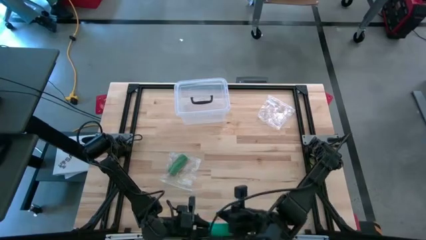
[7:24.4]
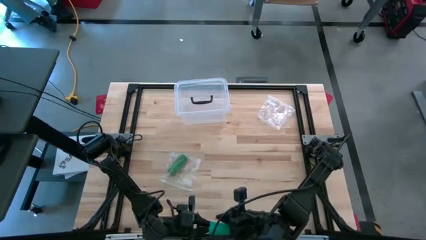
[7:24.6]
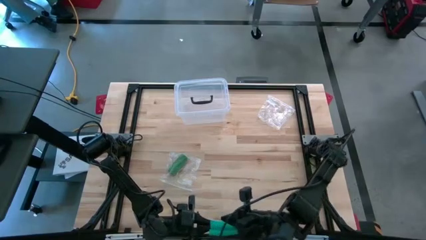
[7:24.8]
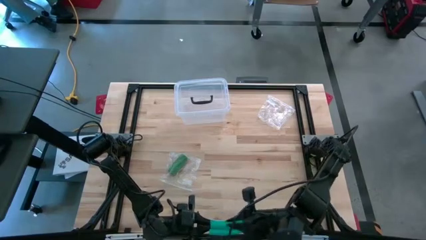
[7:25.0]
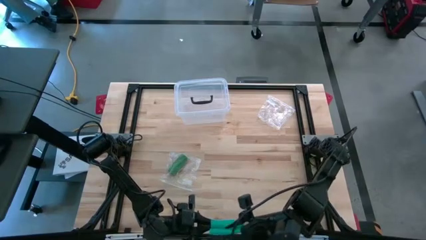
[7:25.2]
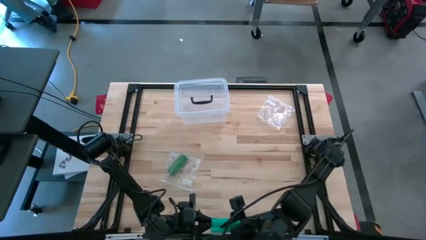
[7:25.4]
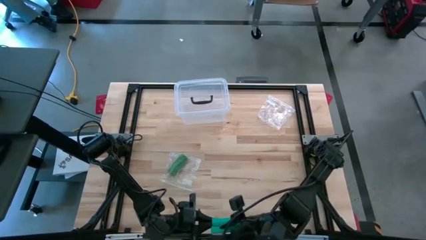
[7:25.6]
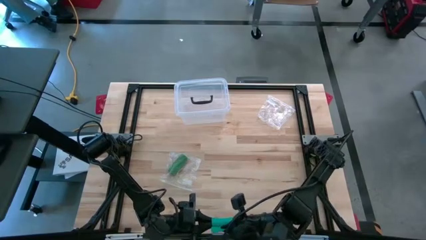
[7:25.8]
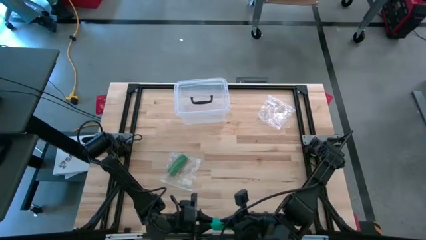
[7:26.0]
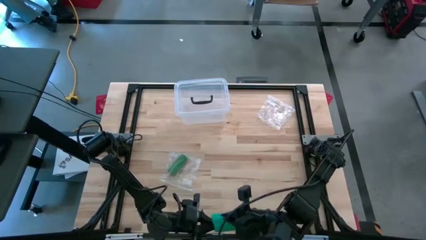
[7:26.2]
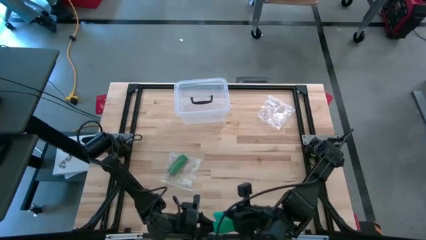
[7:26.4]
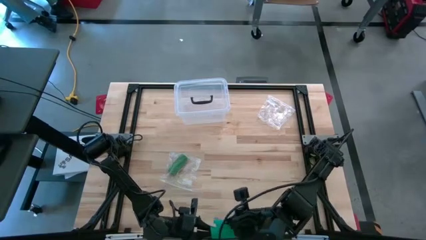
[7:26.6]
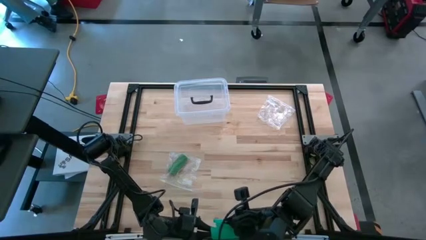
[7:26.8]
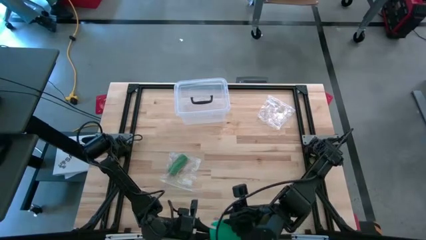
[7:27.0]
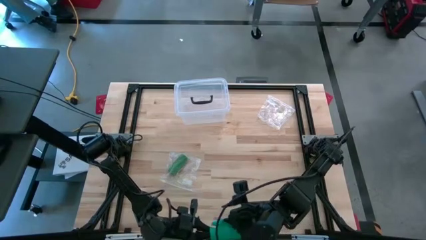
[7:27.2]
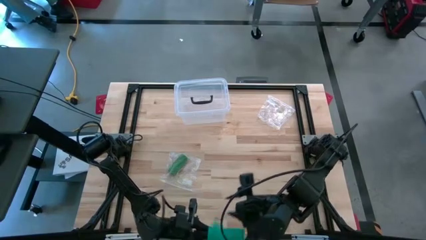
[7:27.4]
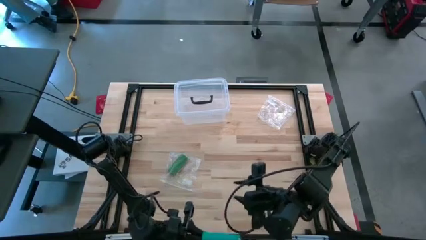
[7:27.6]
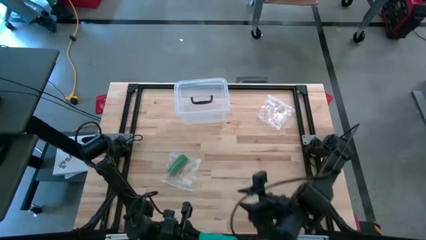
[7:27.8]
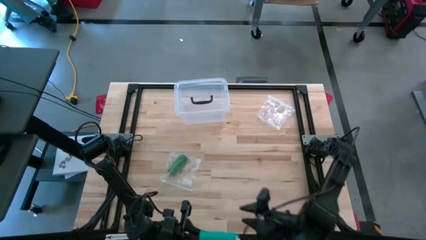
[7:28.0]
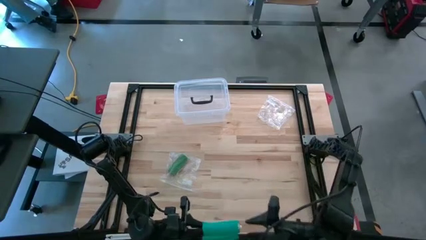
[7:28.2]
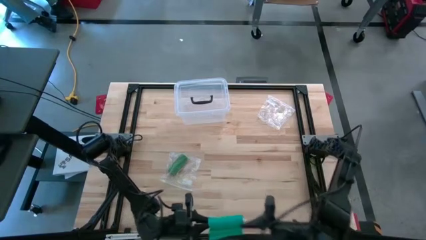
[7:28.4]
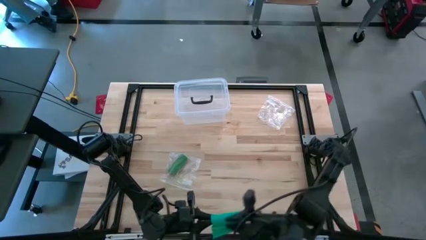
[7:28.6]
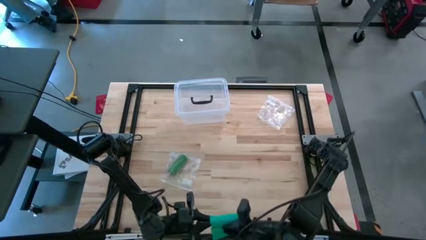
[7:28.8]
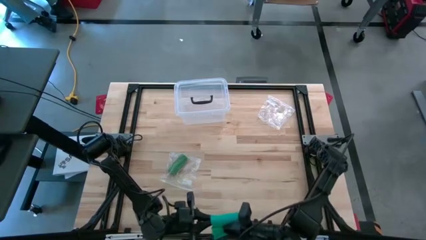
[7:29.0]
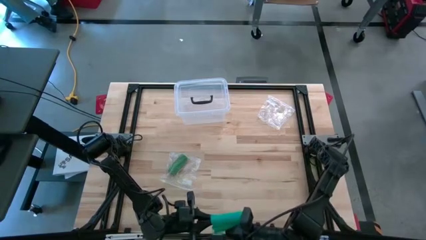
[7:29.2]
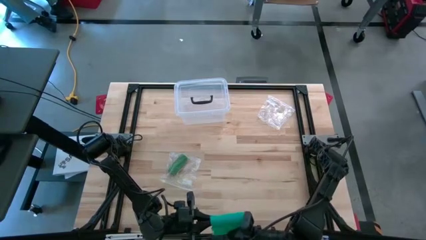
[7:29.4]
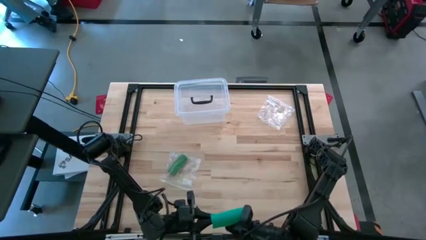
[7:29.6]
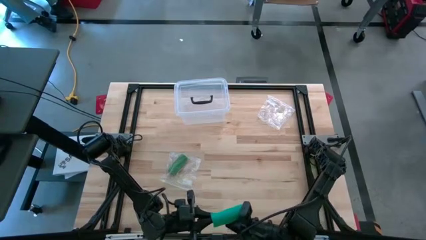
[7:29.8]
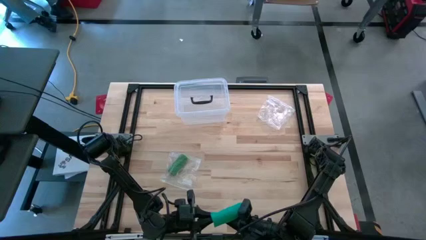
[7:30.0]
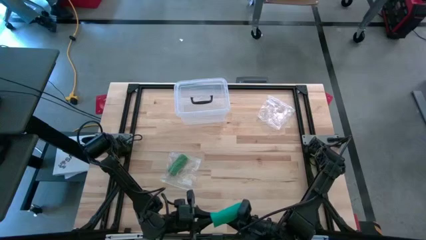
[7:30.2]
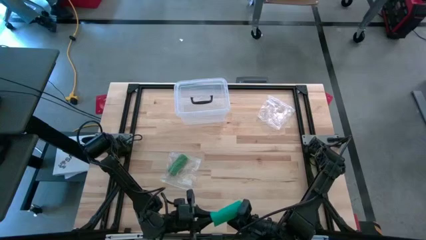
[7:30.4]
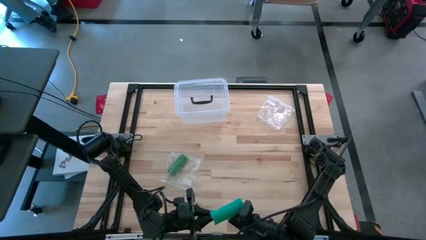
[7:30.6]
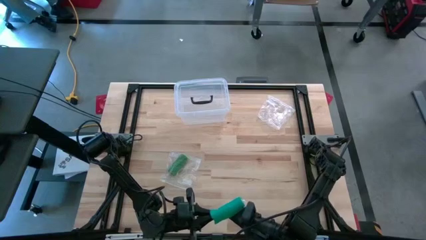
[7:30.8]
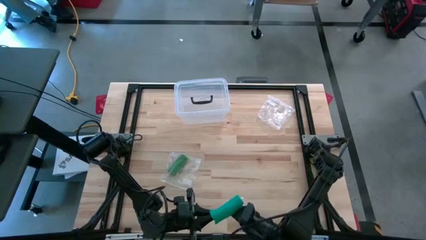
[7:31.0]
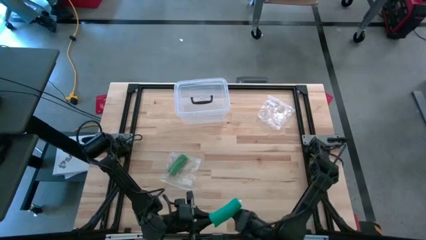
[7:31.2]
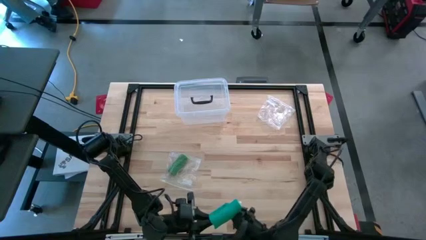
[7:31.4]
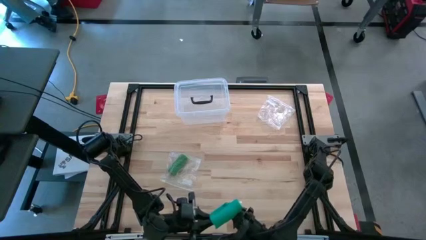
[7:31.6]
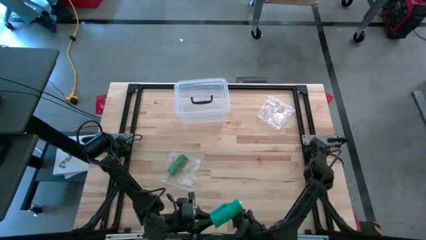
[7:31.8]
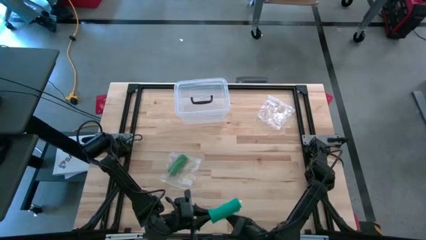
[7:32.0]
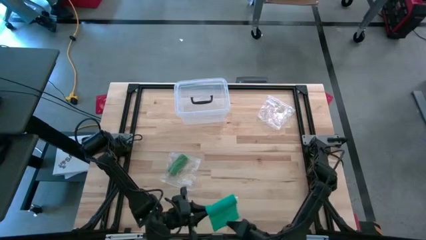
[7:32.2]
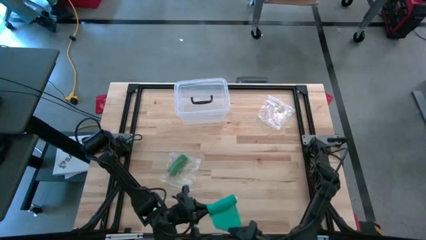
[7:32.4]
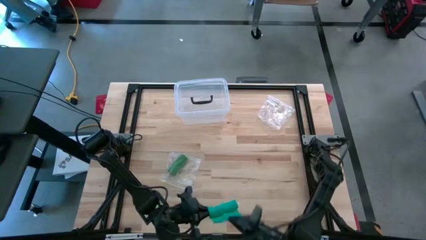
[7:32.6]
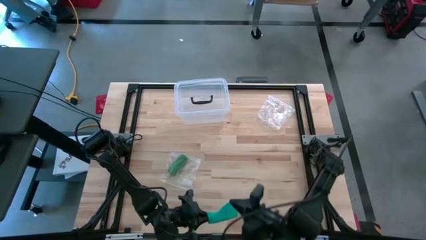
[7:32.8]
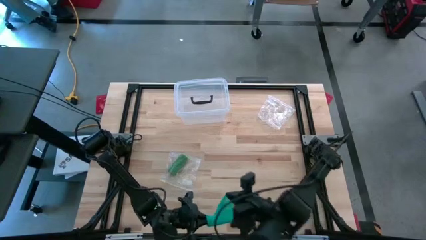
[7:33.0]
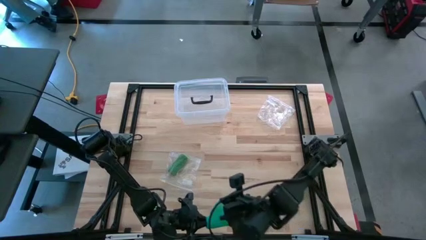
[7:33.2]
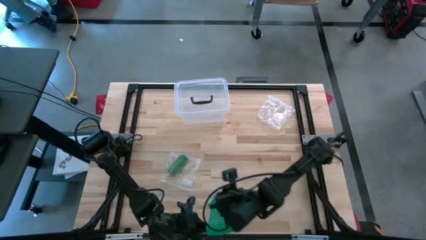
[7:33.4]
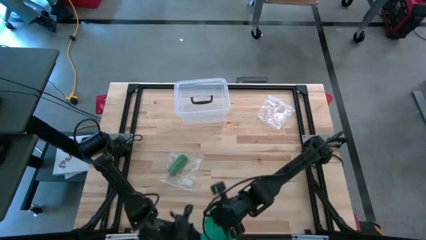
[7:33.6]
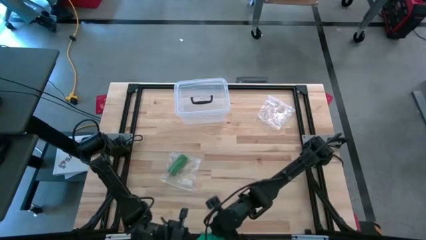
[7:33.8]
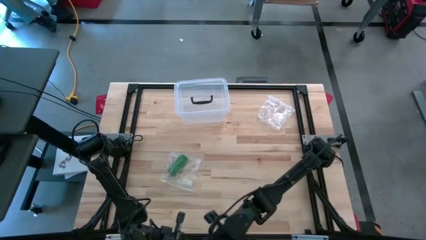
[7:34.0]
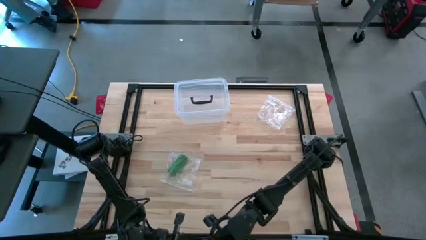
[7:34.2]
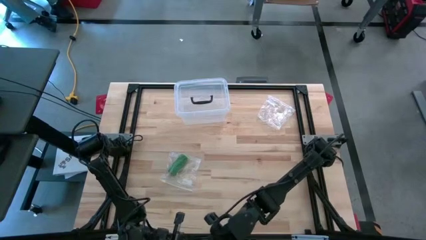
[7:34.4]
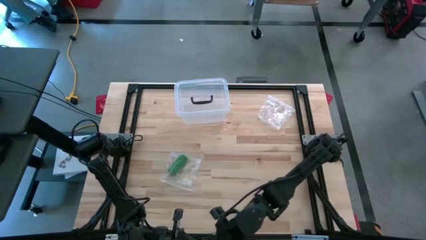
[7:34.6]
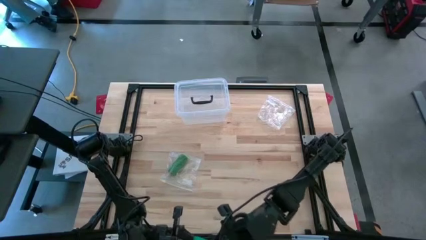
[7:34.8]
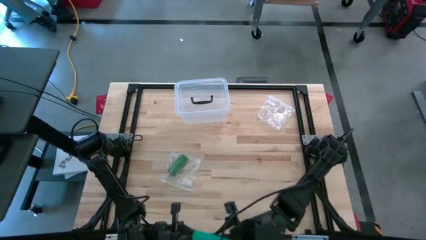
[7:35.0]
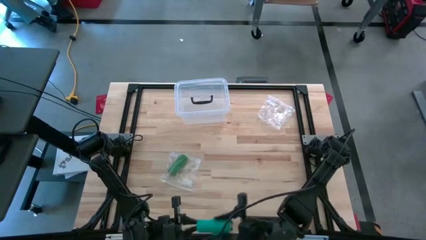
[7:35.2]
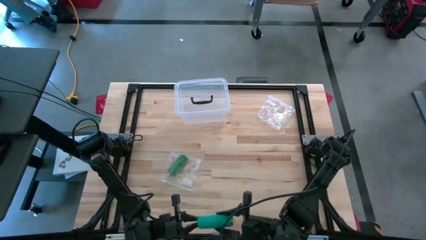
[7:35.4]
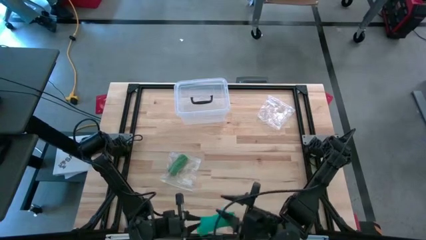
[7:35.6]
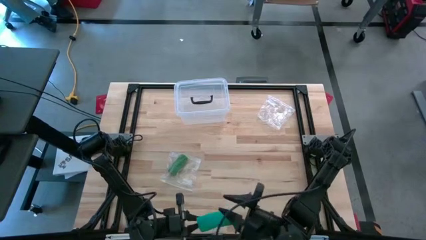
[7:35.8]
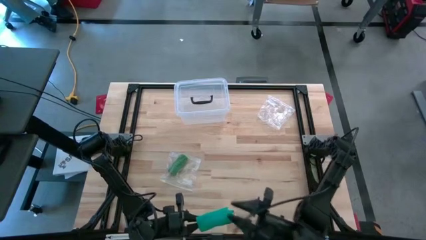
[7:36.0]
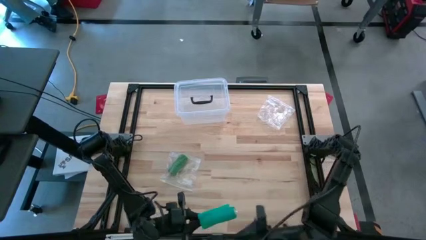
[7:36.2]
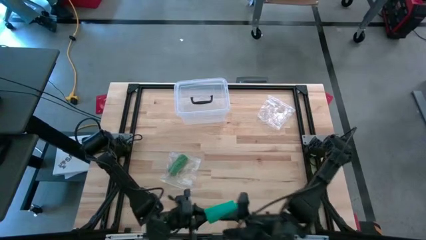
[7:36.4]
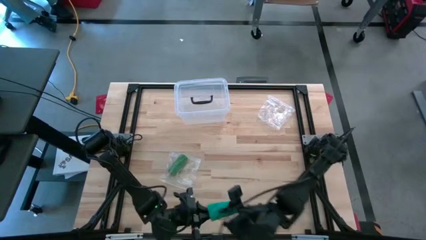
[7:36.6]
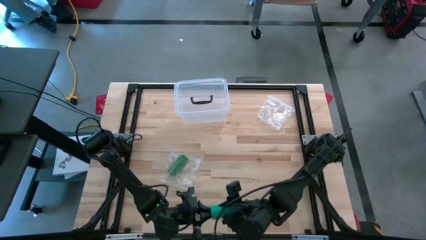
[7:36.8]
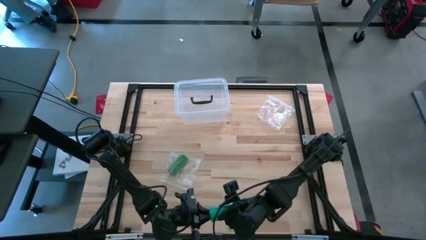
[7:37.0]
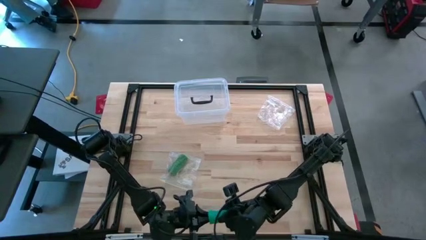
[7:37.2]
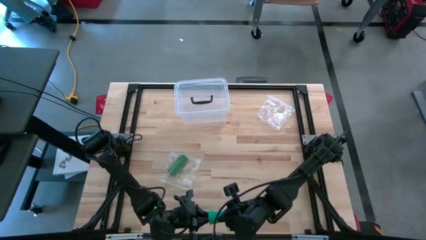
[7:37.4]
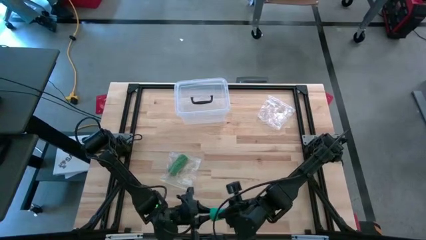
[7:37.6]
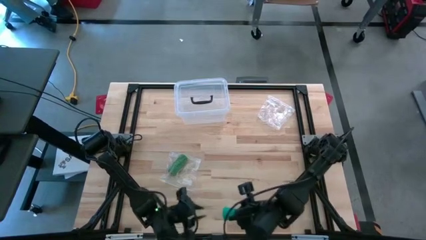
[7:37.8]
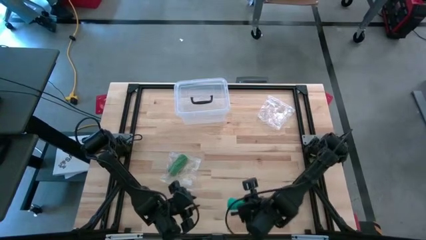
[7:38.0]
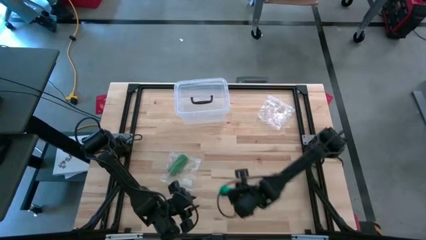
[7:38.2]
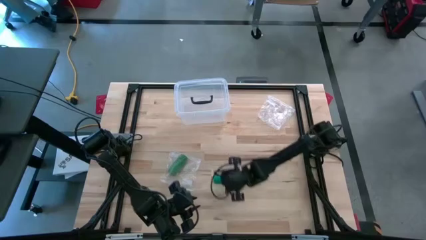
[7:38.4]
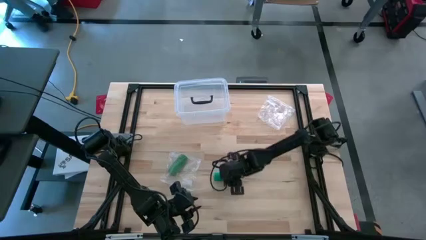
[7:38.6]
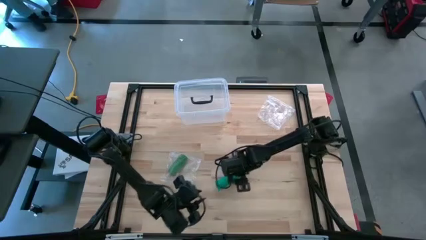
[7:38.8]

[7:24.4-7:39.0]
Task: Roll bandage
Roll the dark green bandage
